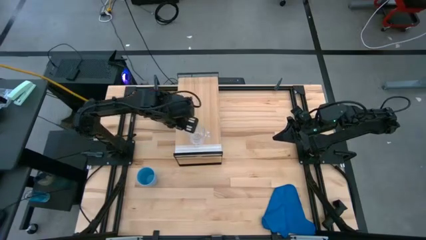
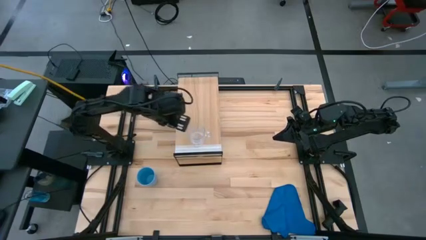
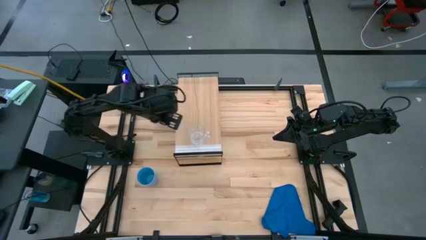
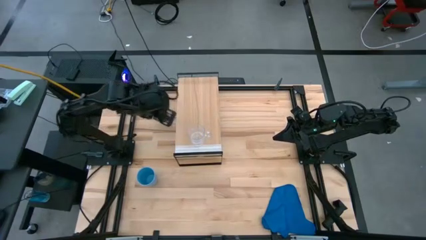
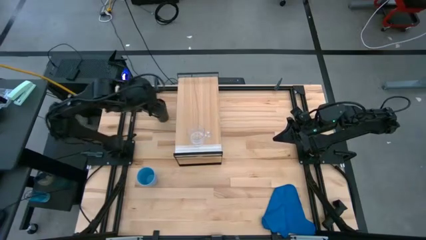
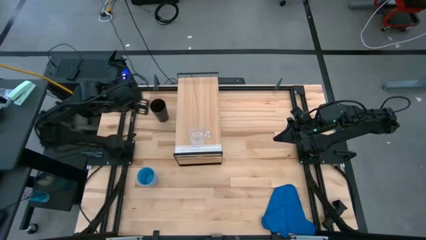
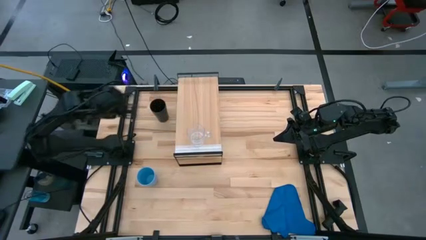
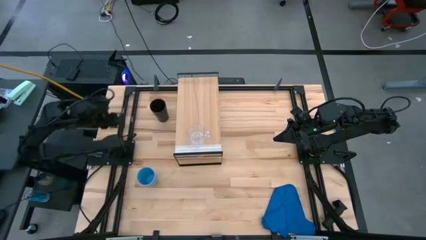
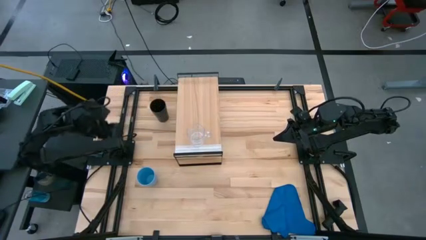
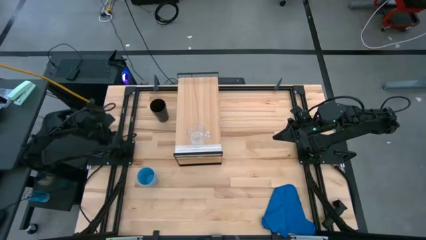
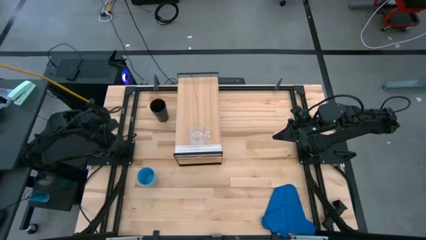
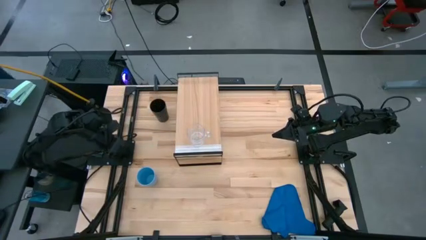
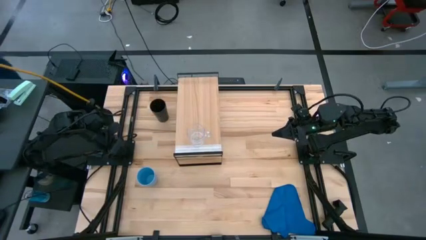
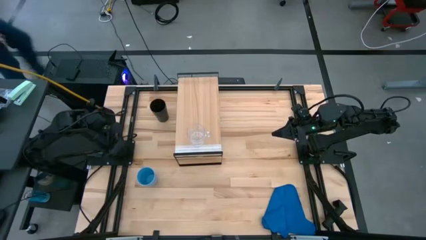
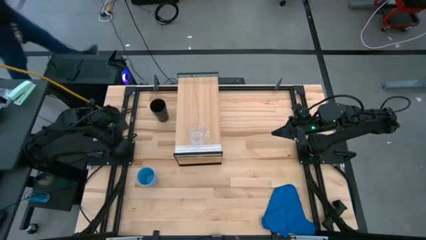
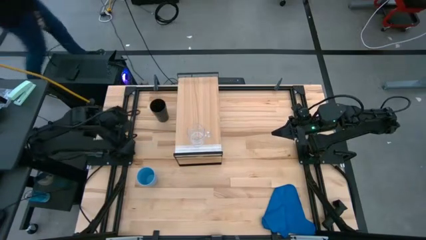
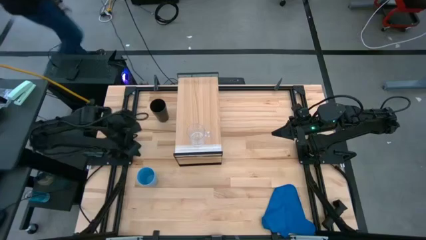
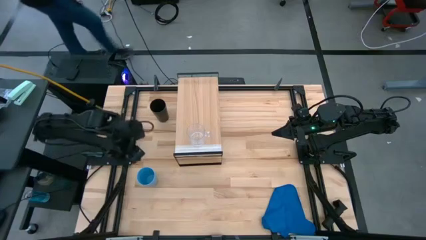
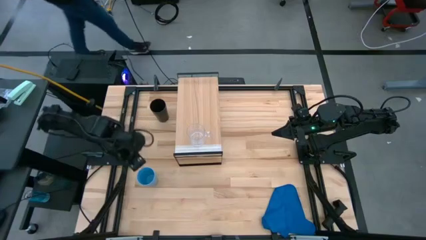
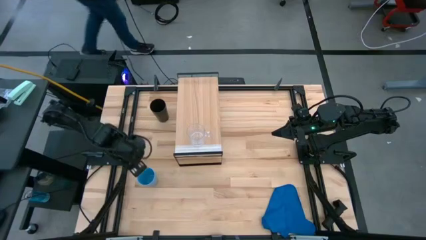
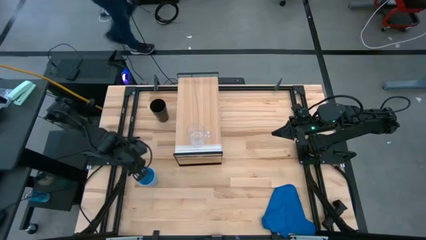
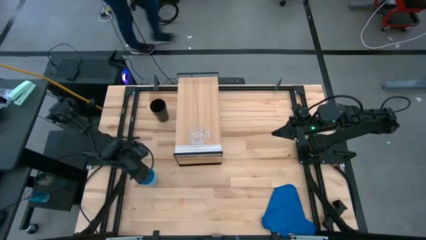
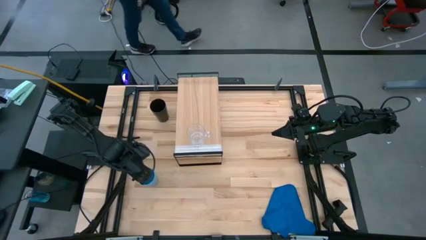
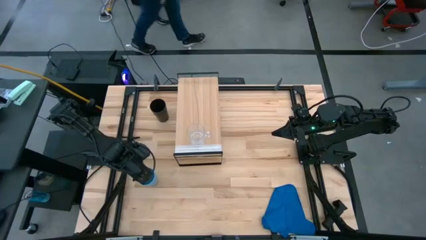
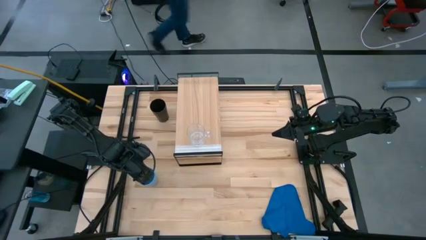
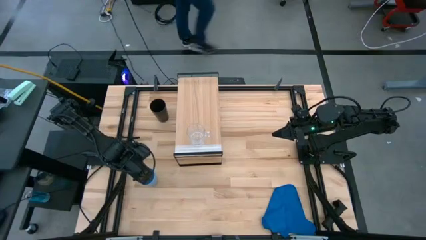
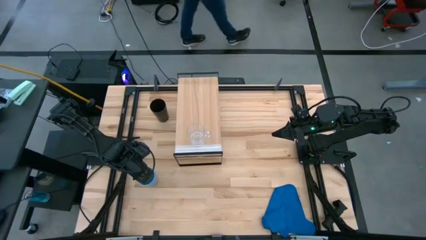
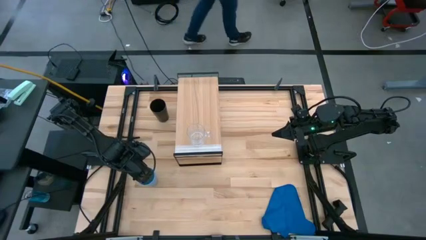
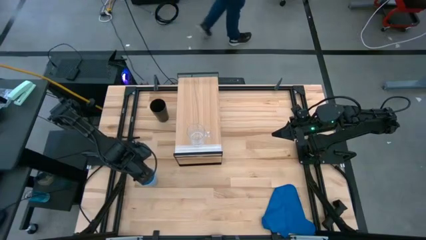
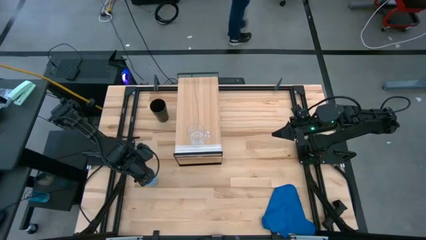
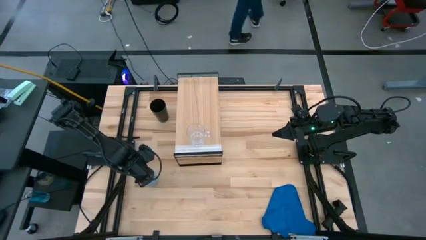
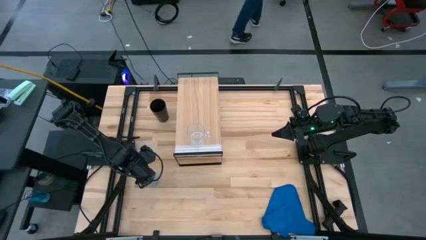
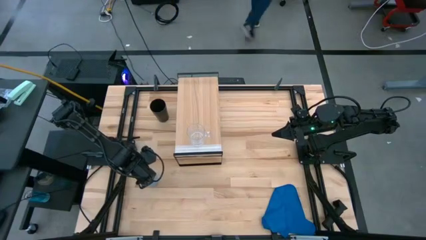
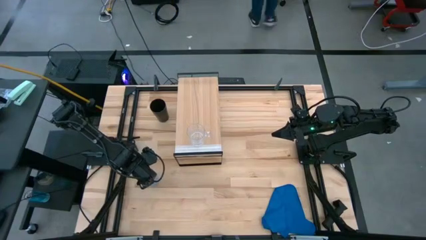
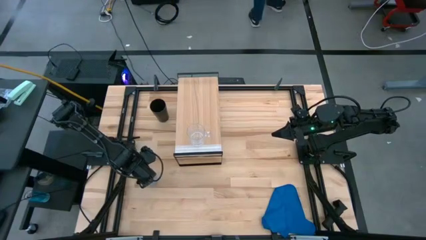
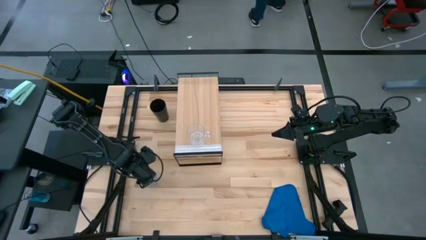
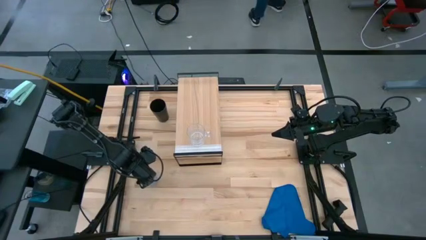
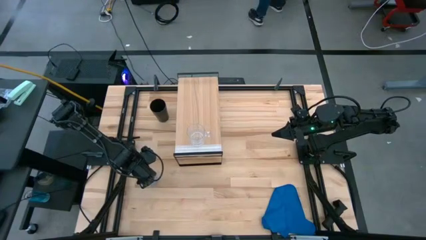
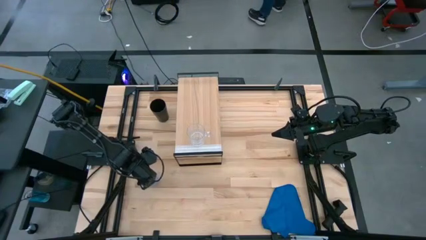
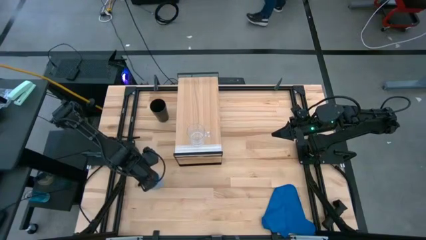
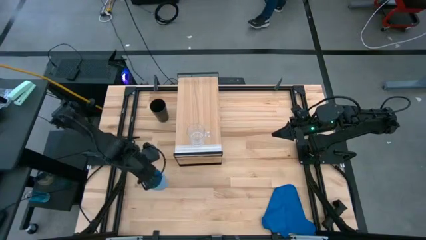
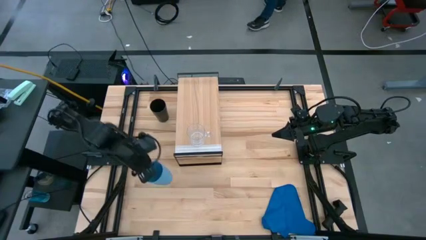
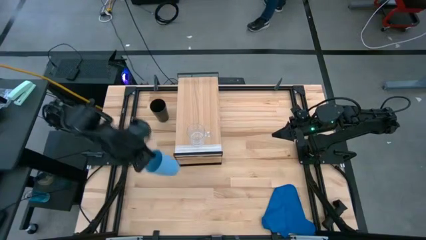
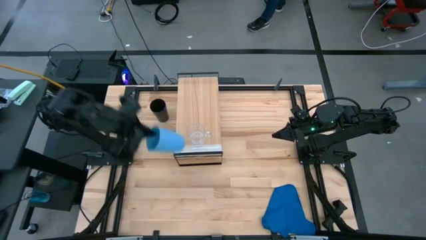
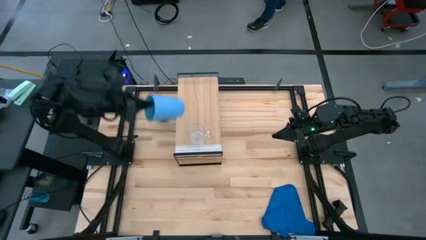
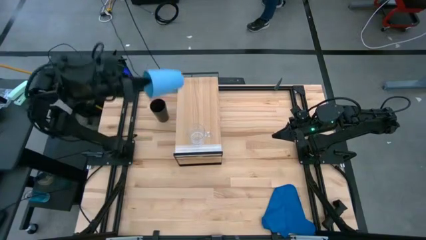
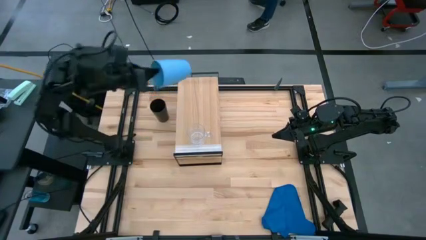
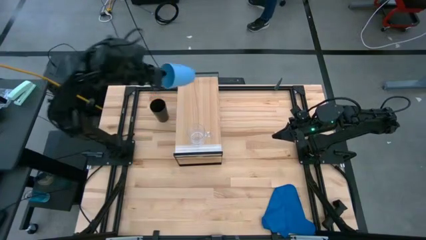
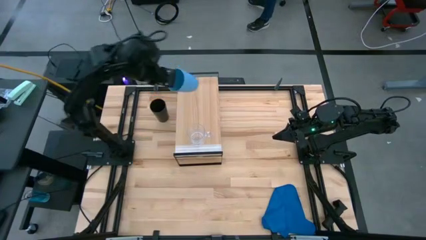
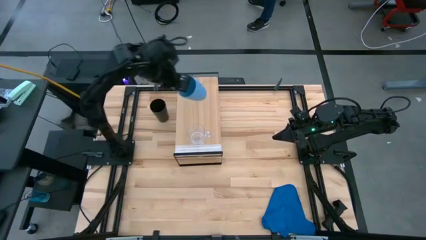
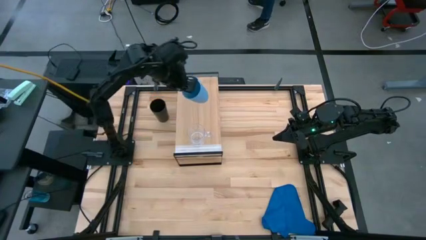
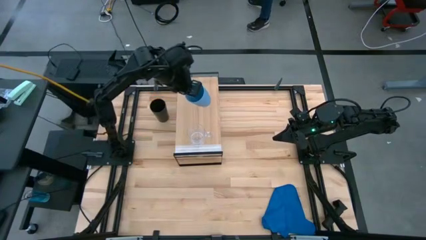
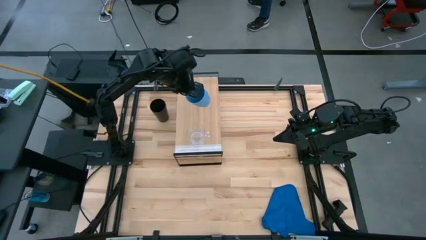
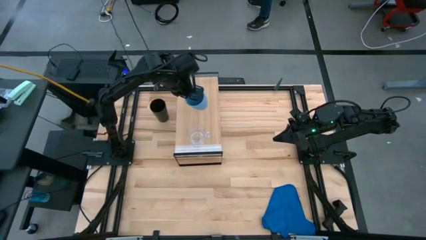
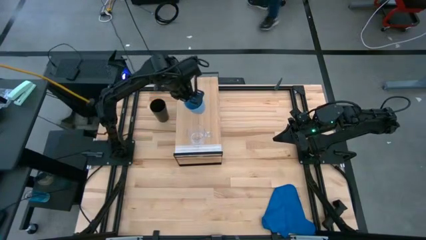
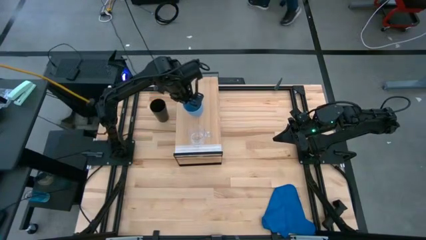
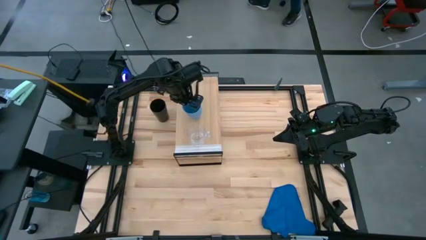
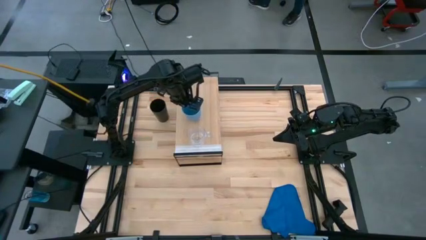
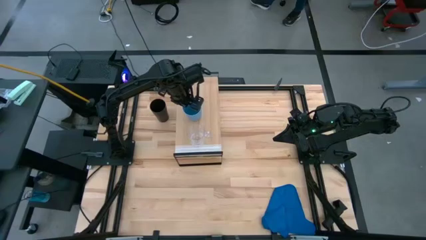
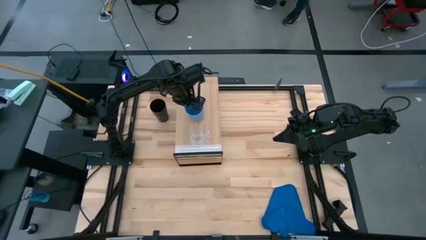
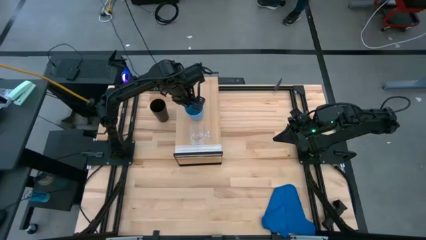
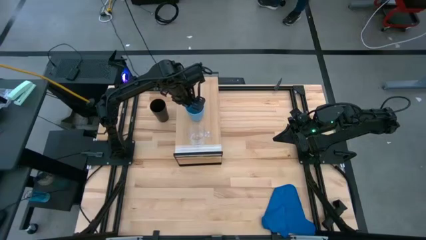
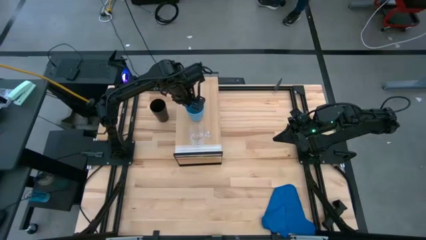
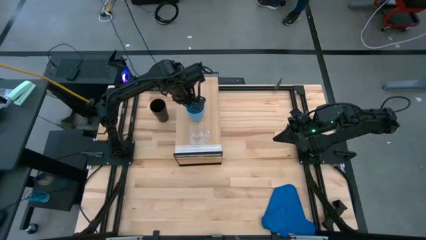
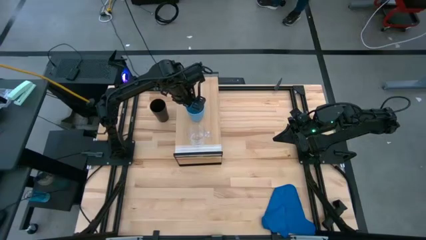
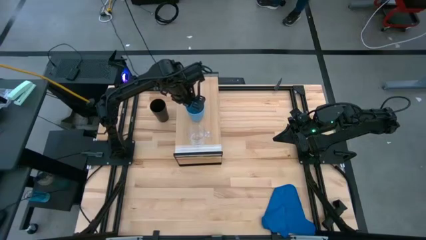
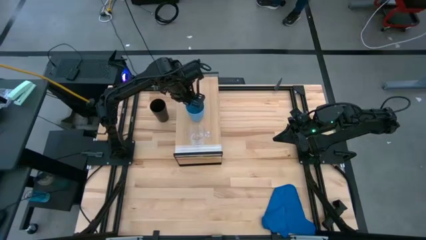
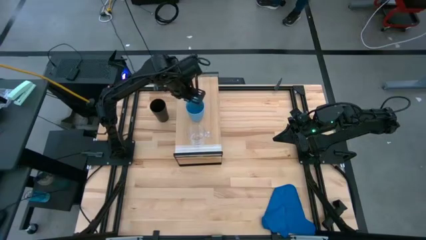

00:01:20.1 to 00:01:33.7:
Task: Stack small to large cups/mugs on shelf
Put the blue cup on the shelf
